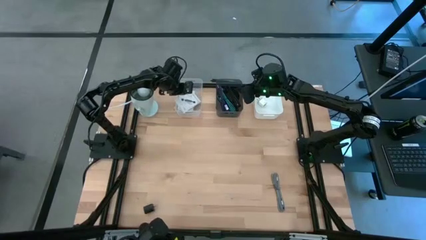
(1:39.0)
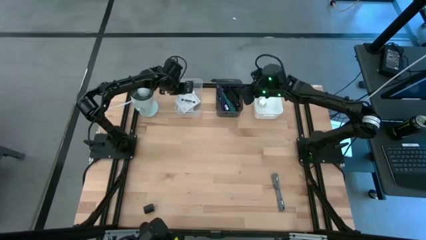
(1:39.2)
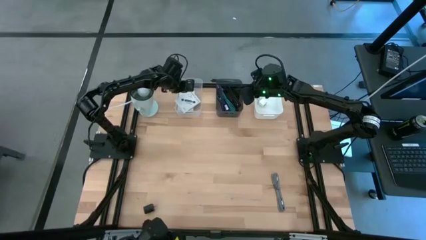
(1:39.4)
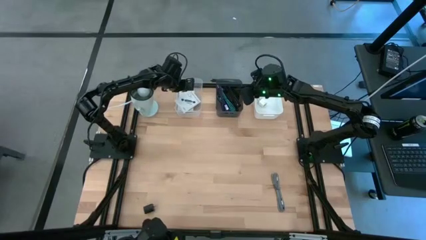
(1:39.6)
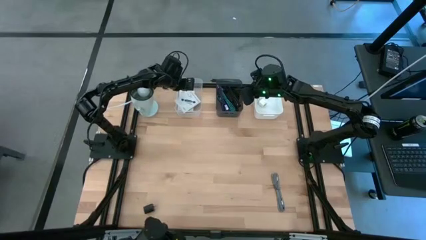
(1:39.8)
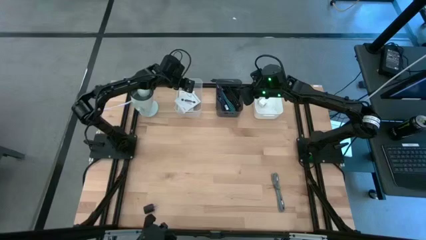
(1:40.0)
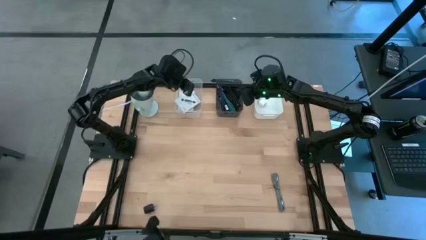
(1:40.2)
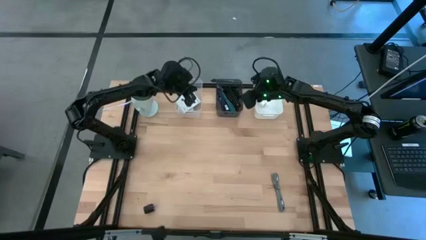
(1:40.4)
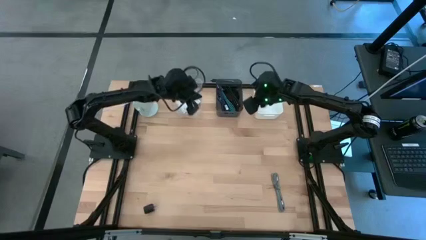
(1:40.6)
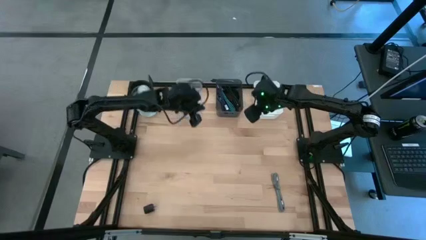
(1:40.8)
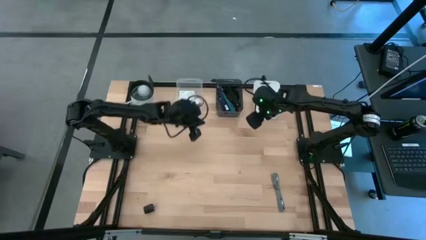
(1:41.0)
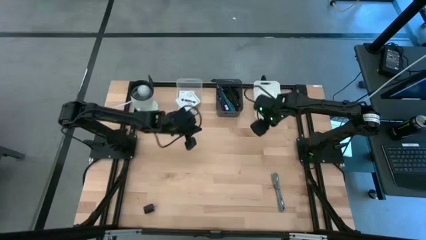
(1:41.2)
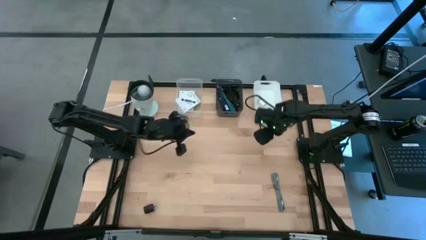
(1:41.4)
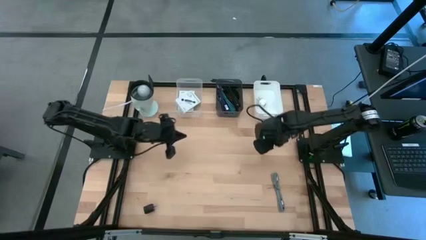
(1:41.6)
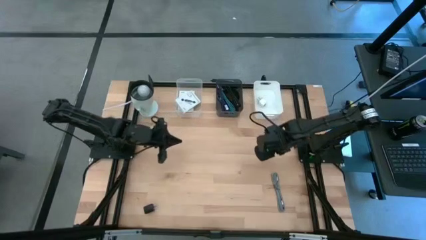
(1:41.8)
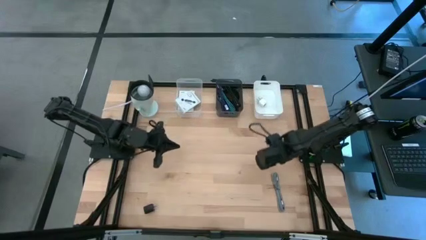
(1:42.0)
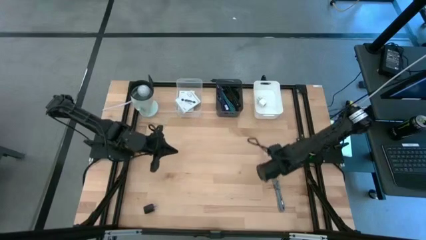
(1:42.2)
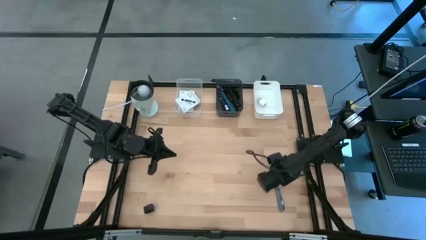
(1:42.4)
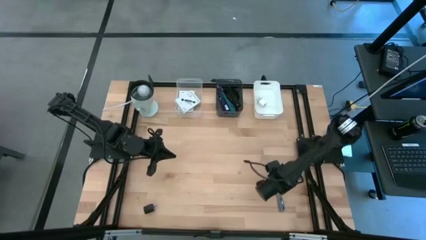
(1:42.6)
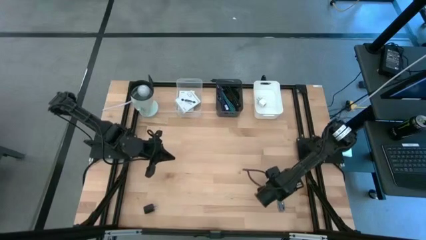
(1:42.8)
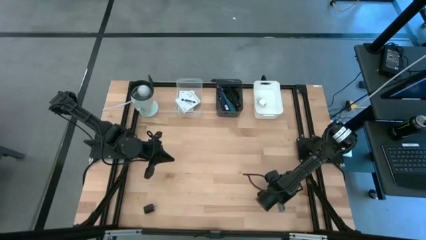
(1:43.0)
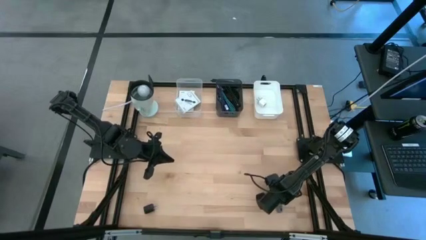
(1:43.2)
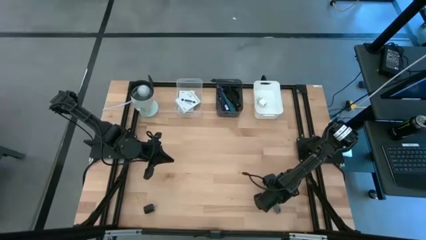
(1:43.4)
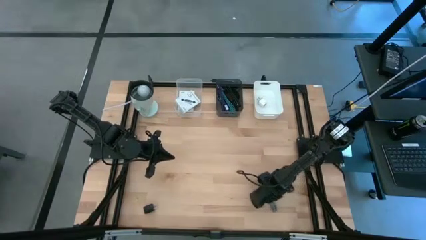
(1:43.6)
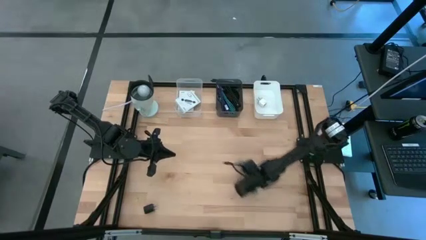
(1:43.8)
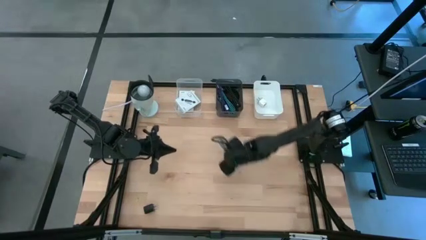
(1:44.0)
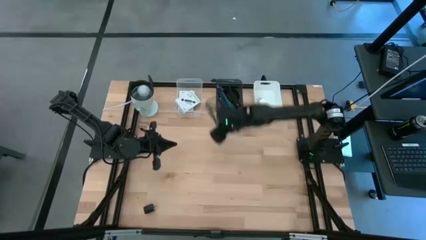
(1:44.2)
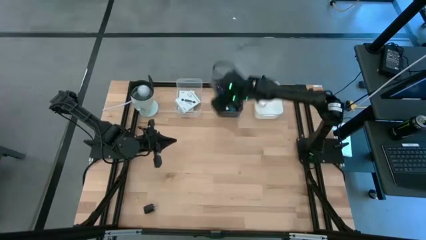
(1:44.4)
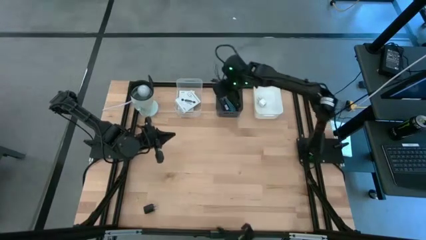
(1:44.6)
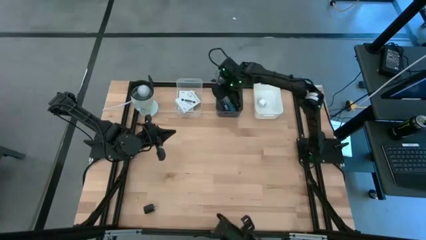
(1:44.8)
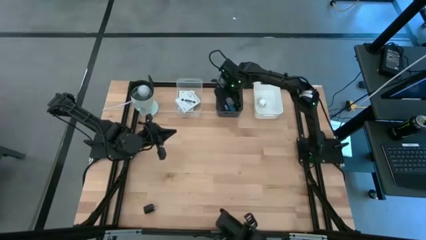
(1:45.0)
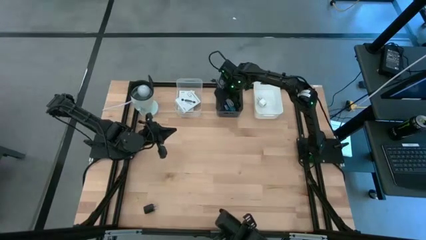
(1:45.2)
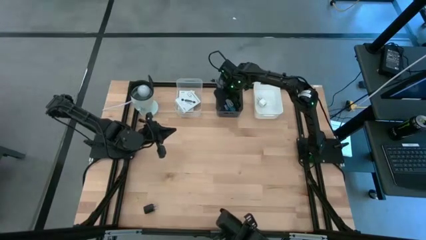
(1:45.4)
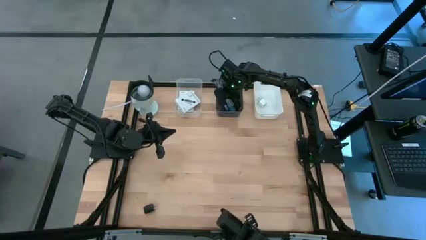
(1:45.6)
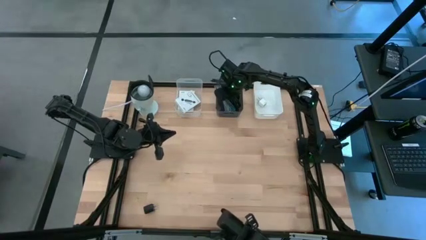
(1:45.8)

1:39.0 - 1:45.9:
Task: Pick and place items into bin
Put the gray charger cable into the black bin

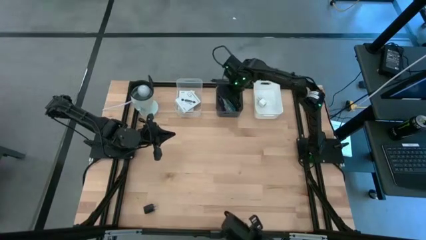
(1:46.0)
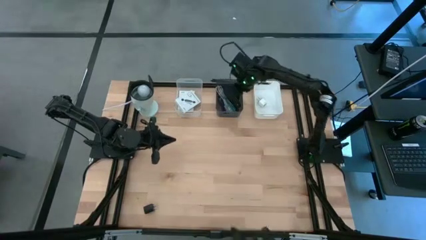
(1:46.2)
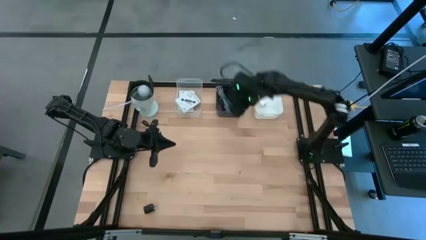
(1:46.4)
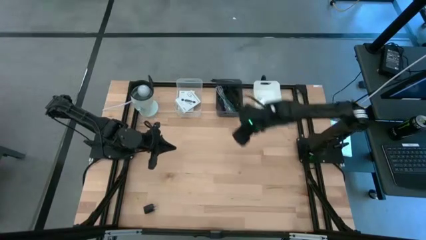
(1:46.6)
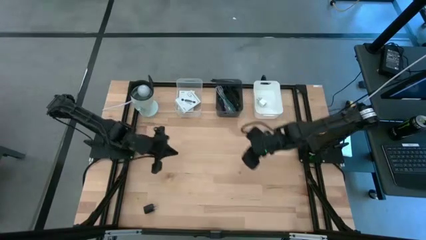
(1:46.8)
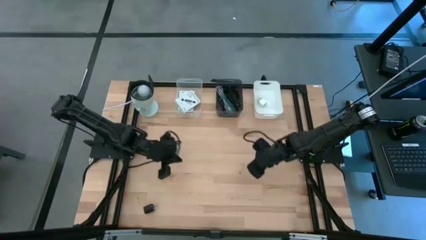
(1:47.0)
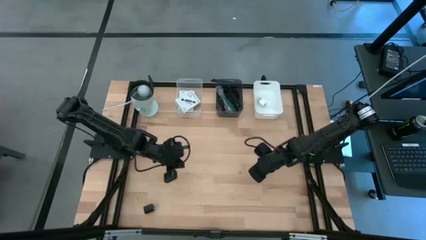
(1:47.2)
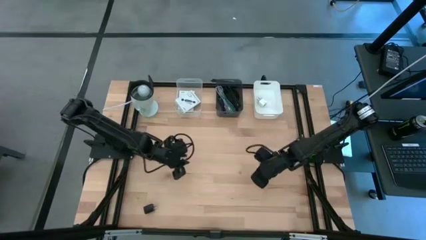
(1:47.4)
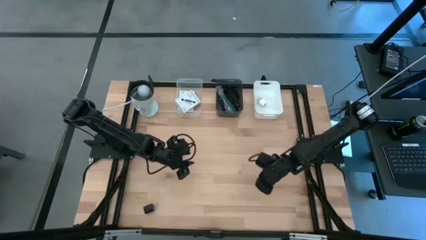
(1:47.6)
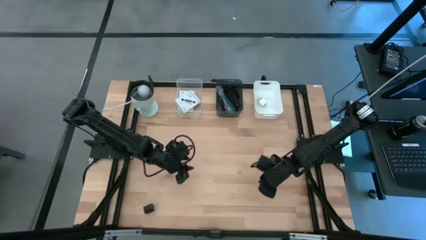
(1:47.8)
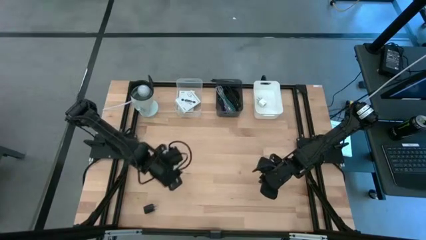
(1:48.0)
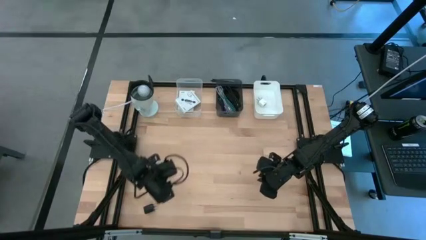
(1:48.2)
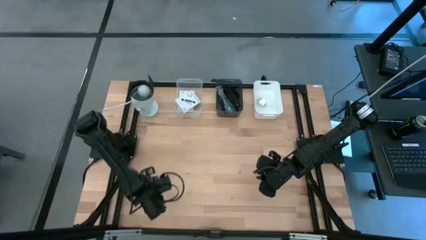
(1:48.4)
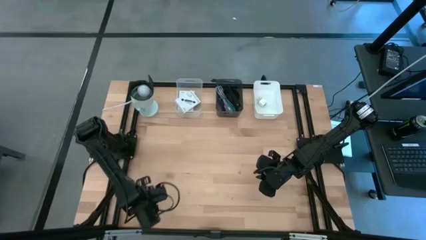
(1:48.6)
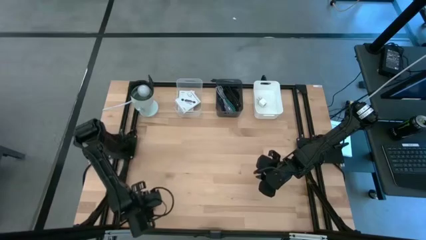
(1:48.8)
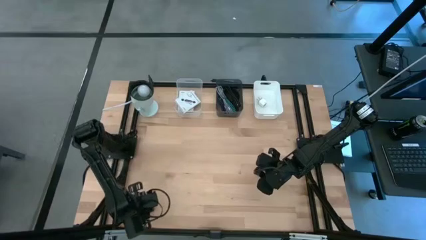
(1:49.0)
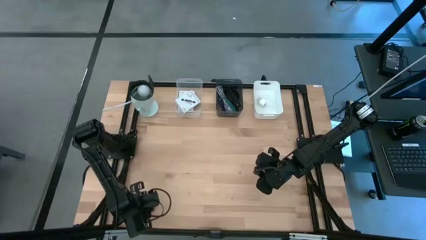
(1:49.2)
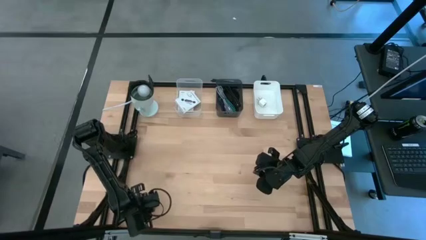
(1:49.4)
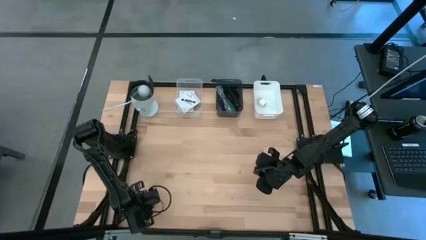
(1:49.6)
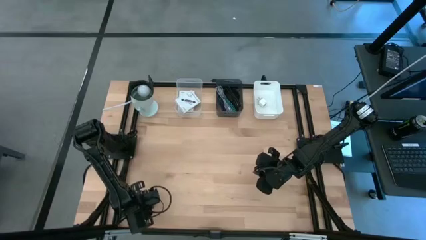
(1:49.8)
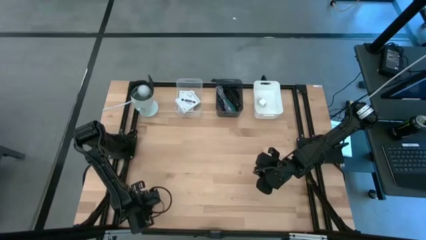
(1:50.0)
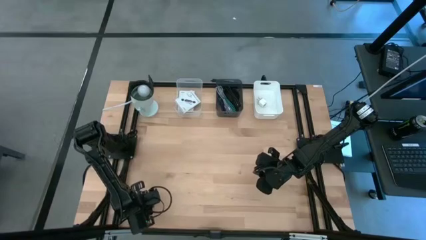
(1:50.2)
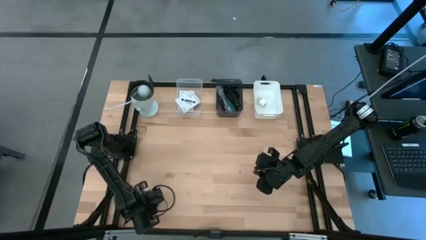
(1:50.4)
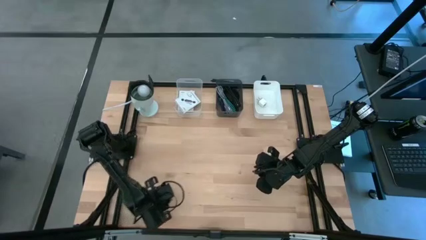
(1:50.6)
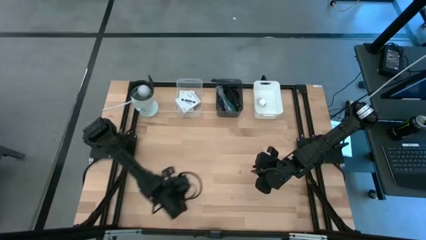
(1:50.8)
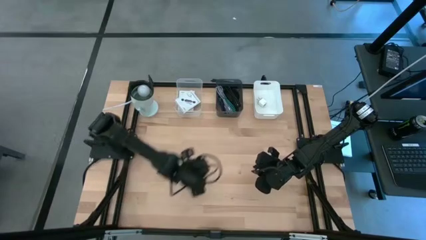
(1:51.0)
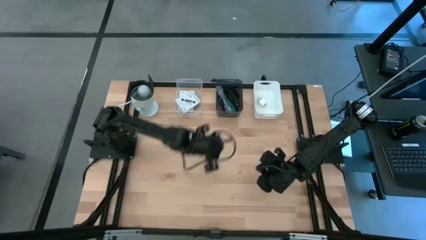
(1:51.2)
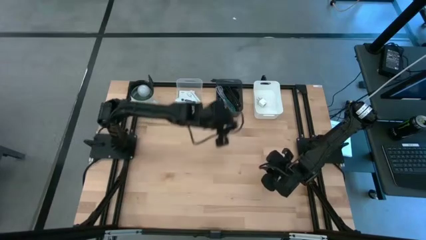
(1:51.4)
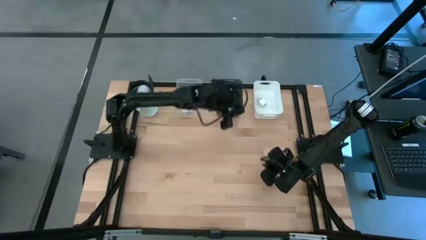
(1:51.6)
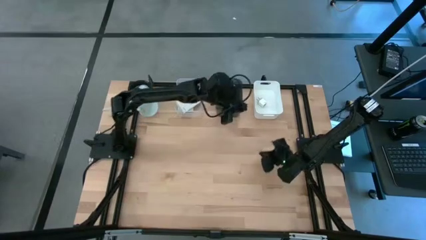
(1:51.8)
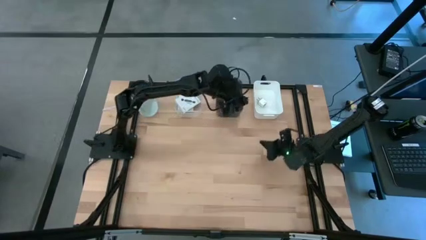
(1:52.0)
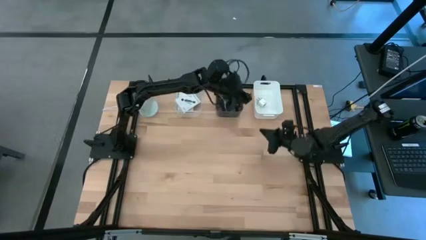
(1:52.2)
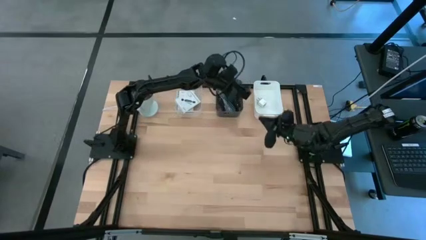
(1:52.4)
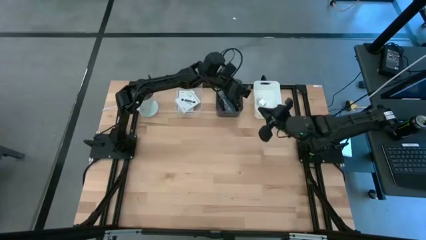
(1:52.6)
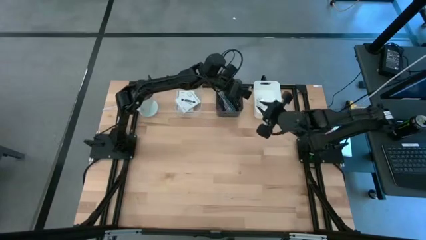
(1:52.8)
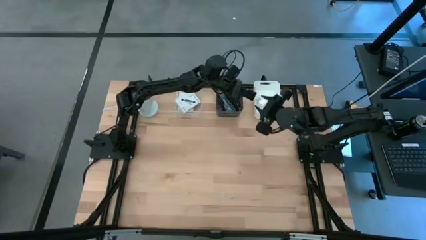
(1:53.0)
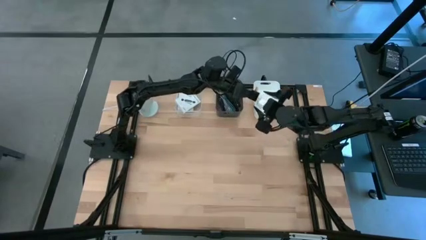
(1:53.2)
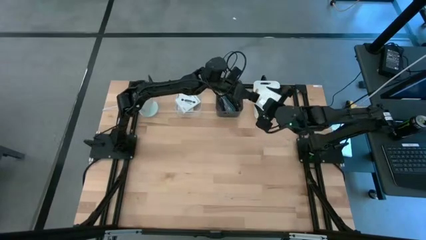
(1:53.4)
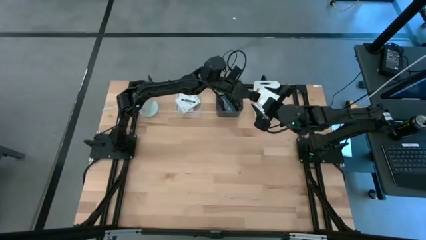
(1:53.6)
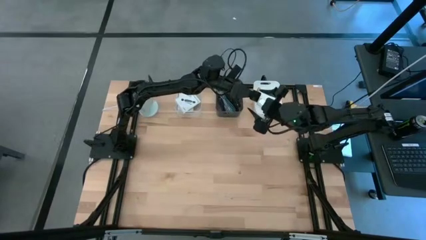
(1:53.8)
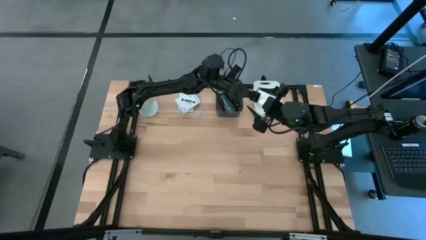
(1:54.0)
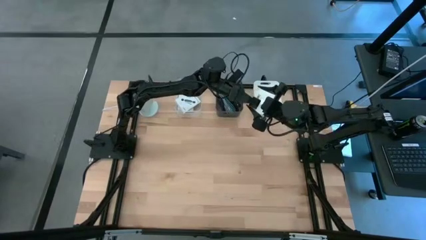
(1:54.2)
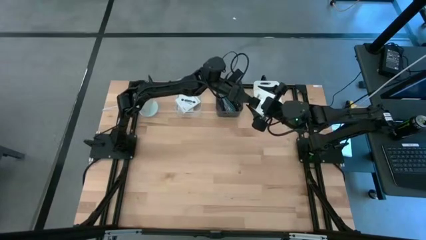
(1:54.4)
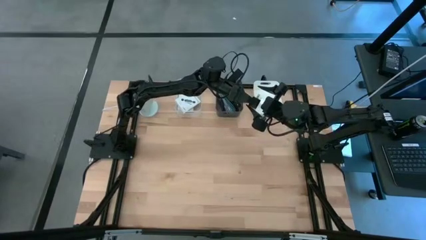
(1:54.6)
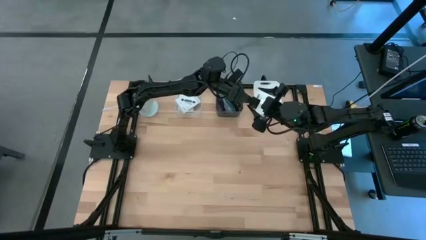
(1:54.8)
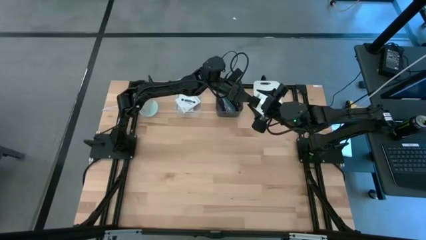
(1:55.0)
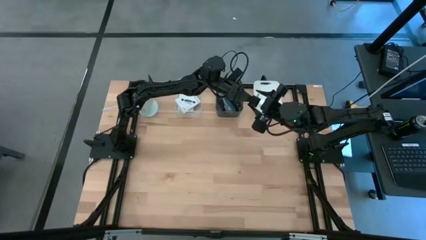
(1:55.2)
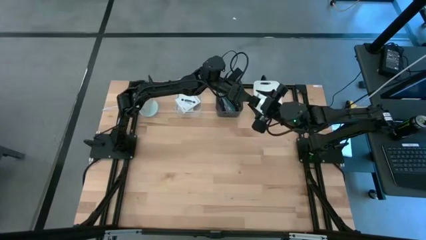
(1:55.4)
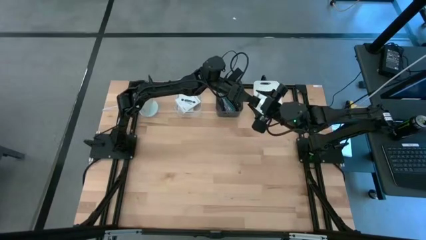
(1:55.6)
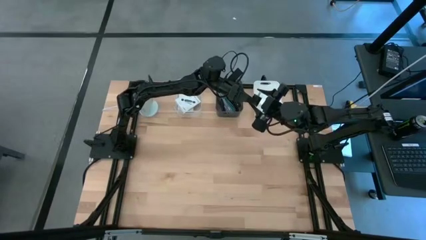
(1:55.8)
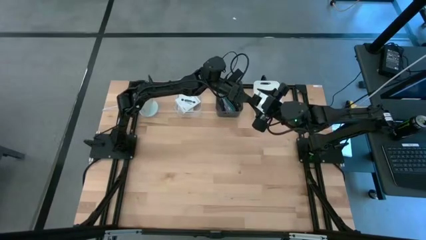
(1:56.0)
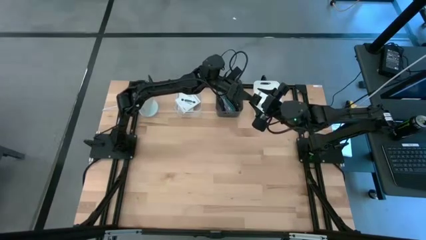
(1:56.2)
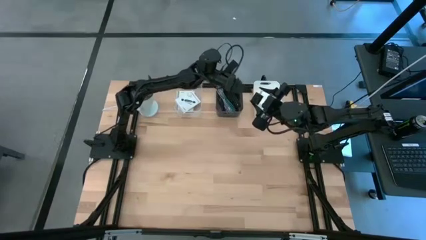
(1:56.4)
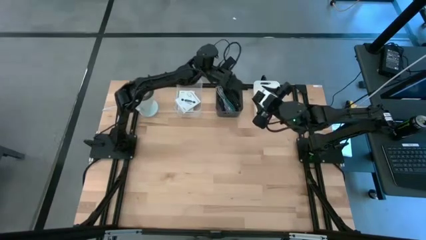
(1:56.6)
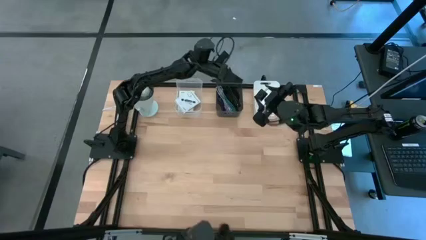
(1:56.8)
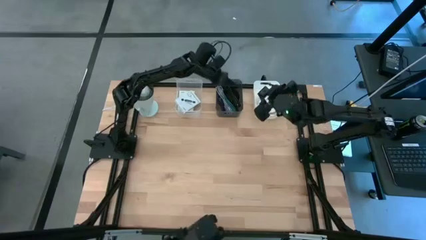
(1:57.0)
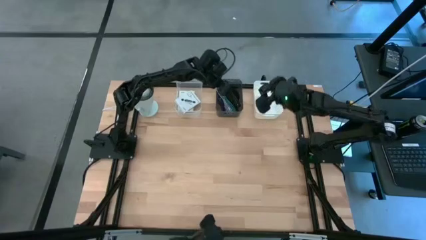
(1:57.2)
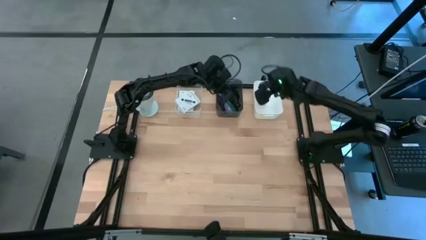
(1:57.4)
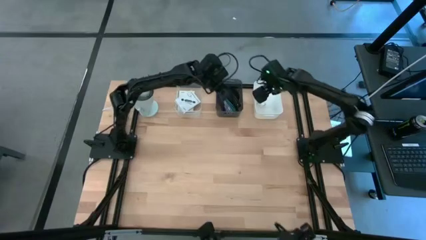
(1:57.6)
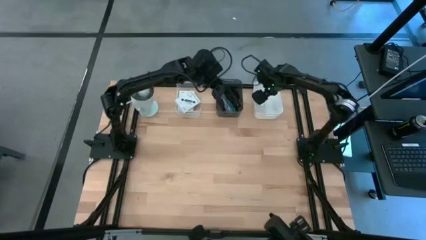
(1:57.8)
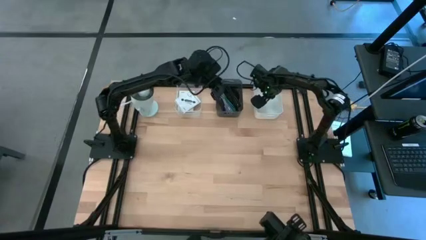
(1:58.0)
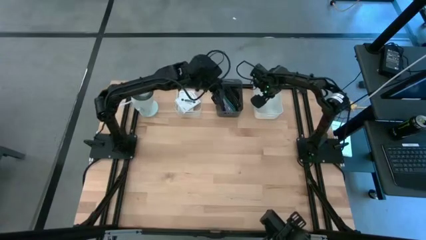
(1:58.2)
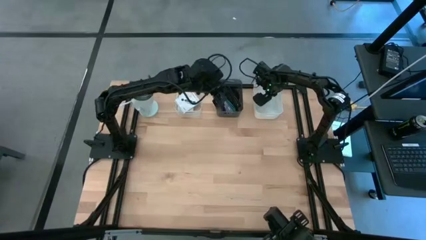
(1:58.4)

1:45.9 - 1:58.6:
Put the black charger adapter into the white bin
